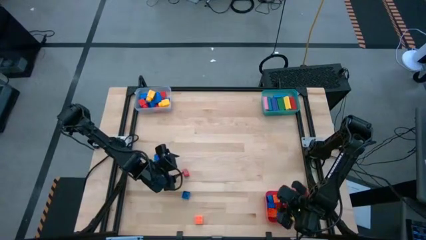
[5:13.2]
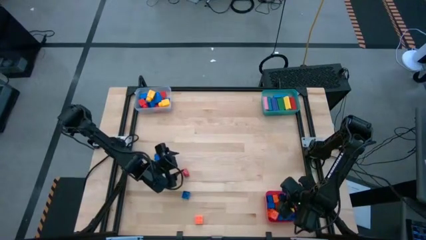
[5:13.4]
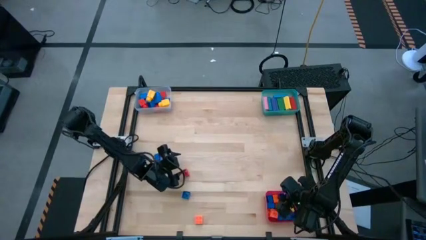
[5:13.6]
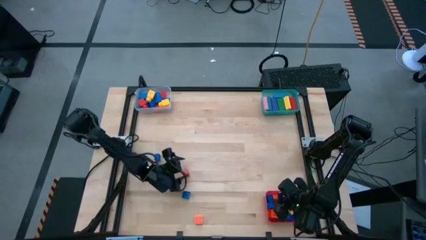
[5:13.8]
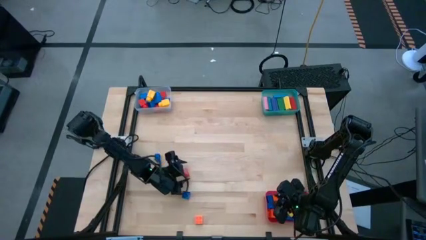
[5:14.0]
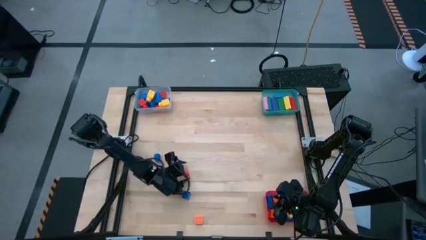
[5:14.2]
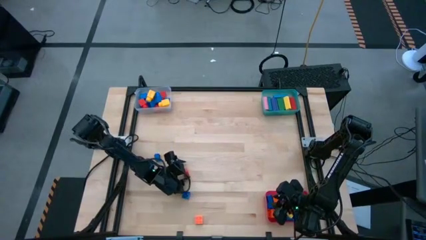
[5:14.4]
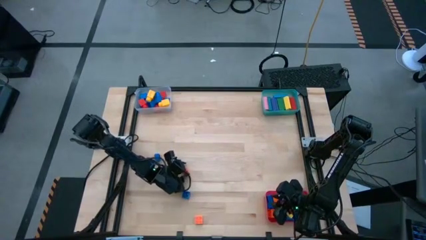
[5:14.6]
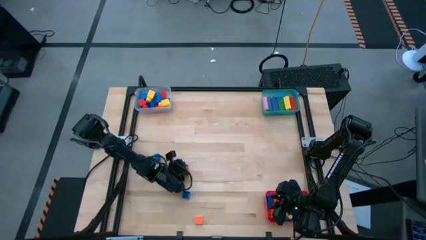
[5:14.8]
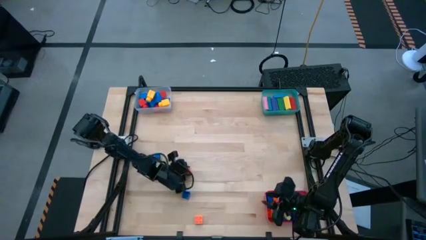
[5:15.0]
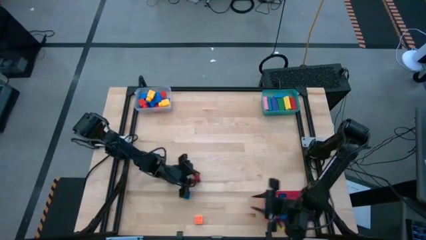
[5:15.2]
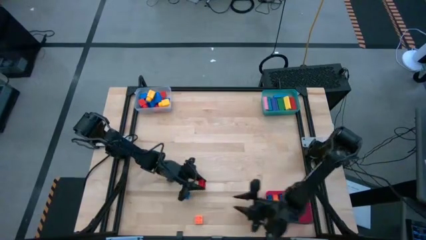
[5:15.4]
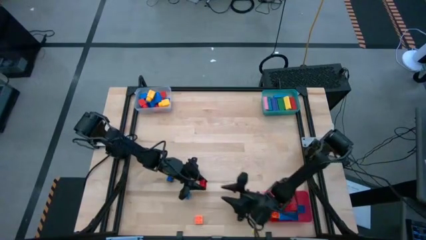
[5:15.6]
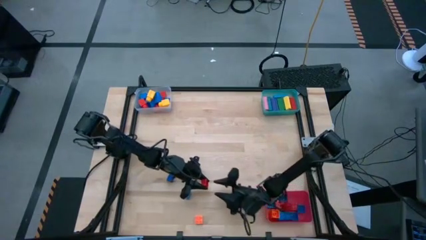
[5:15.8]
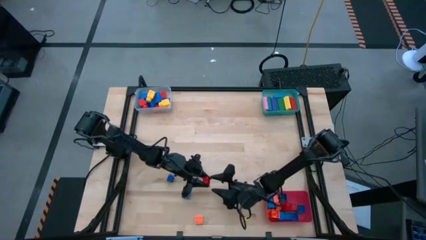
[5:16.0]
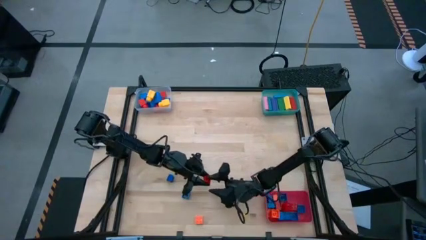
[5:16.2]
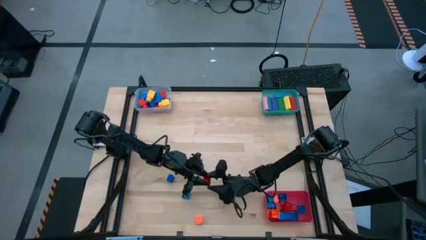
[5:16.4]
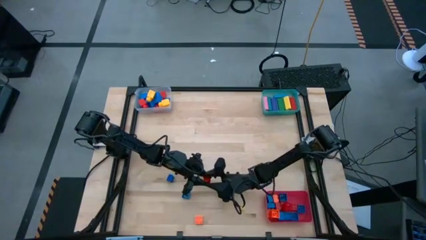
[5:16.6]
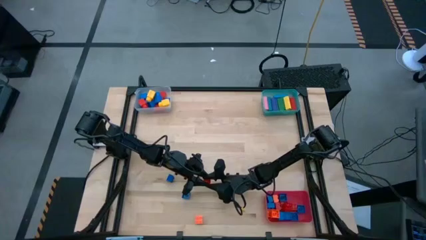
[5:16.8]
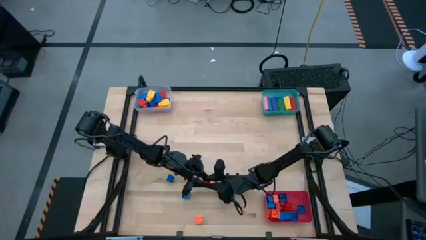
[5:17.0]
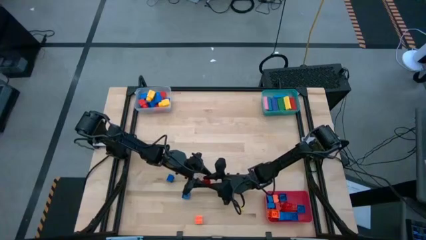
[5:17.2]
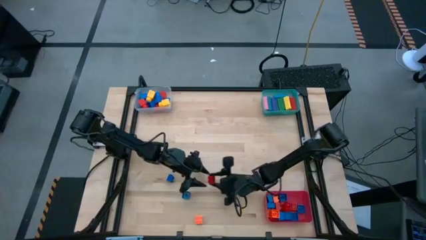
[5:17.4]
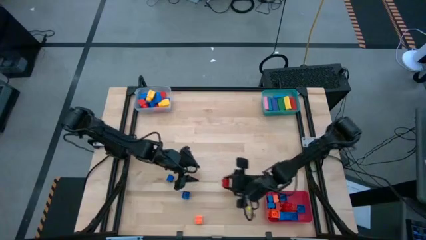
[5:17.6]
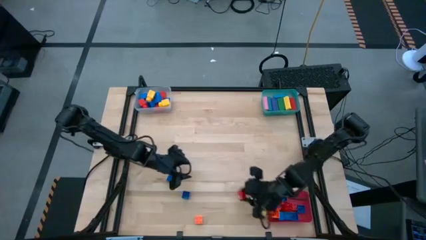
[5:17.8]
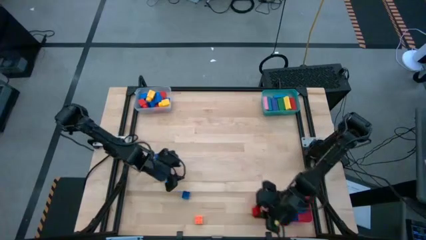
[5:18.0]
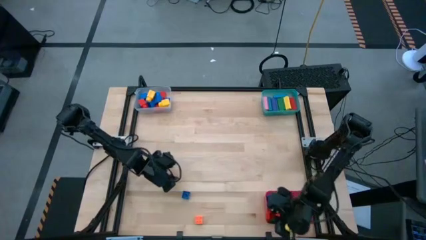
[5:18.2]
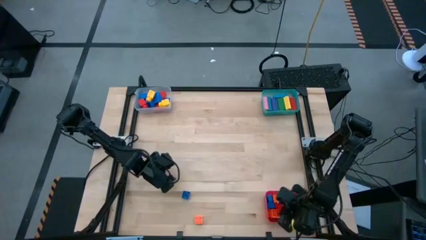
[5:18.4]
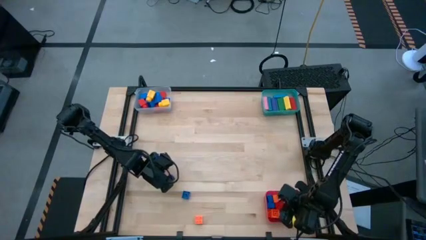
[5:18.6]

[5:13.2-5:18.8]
Task: Sort blocks by size
Put the small red game piece into the red bin

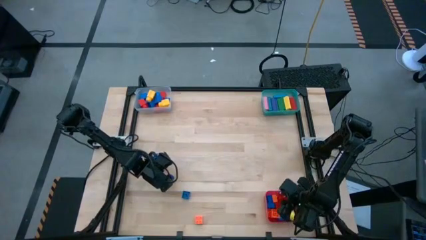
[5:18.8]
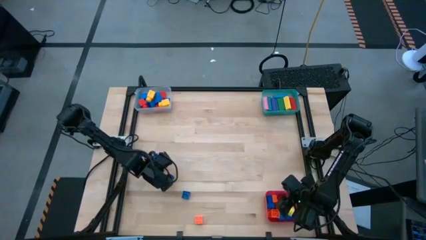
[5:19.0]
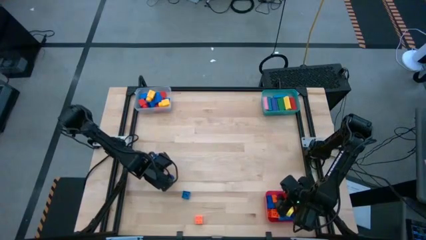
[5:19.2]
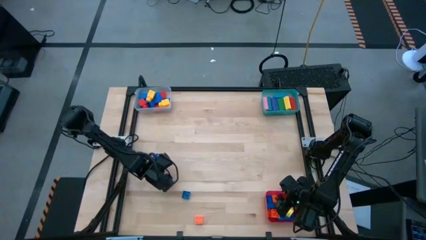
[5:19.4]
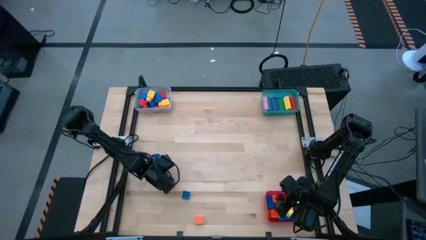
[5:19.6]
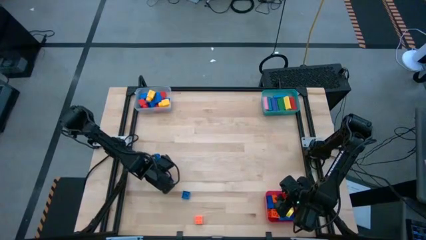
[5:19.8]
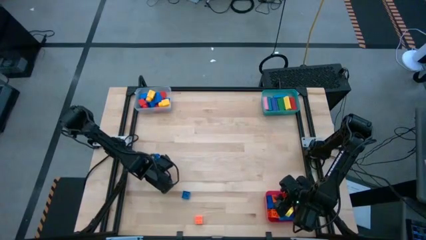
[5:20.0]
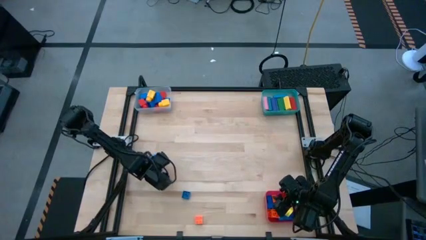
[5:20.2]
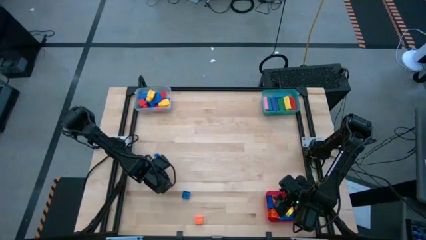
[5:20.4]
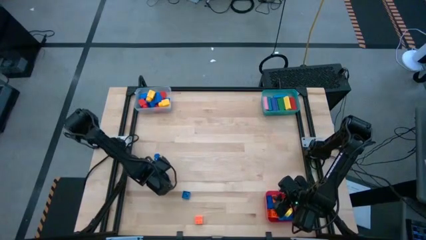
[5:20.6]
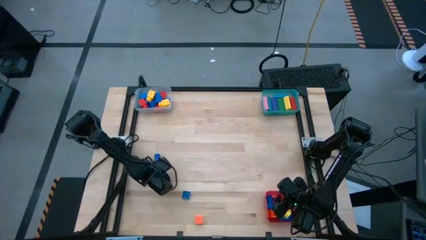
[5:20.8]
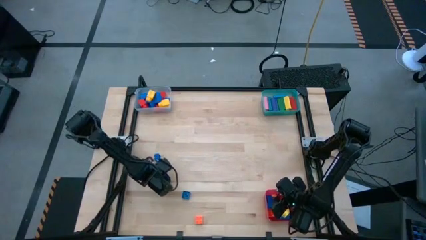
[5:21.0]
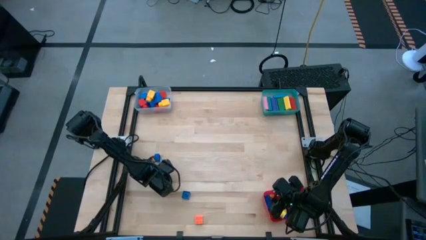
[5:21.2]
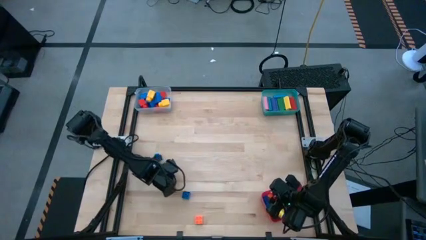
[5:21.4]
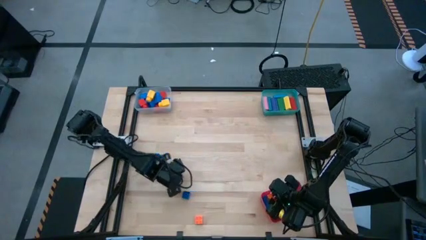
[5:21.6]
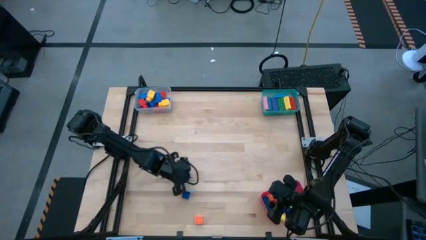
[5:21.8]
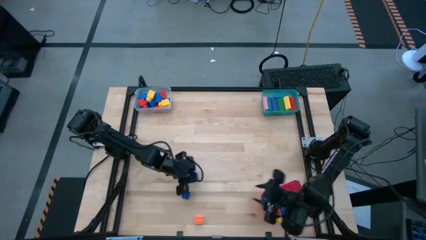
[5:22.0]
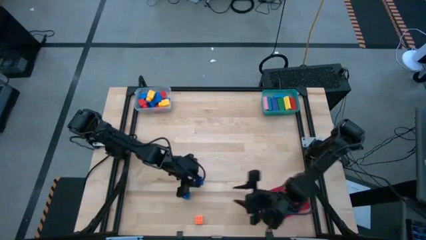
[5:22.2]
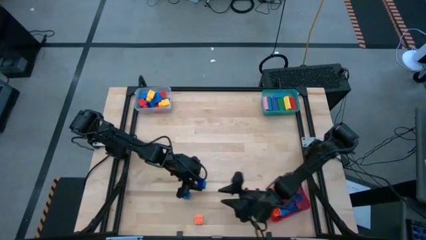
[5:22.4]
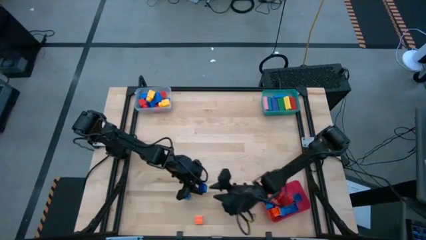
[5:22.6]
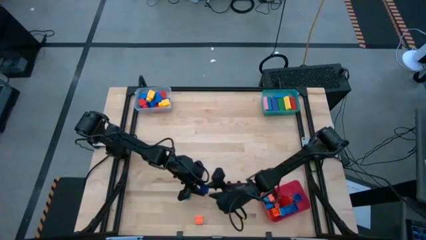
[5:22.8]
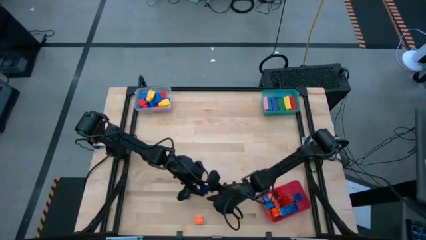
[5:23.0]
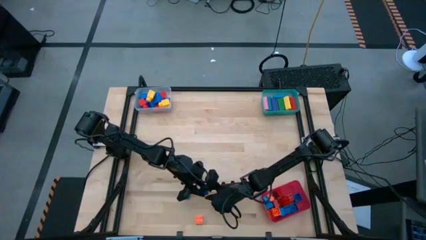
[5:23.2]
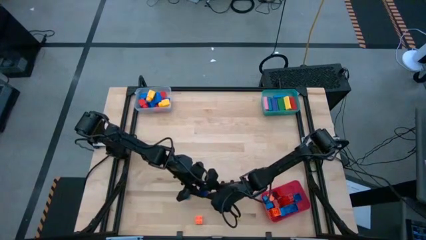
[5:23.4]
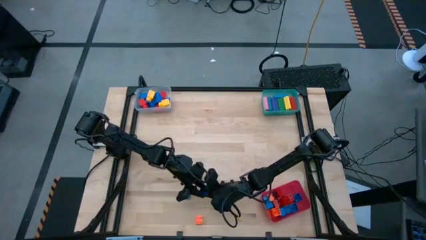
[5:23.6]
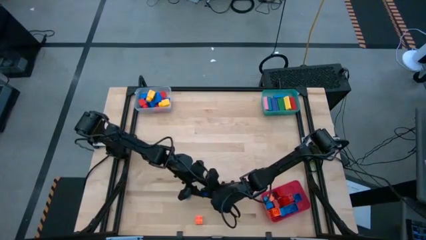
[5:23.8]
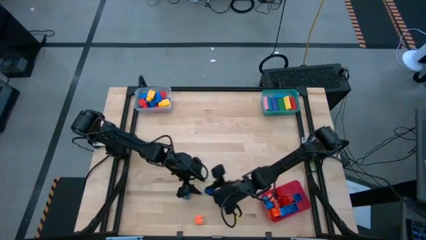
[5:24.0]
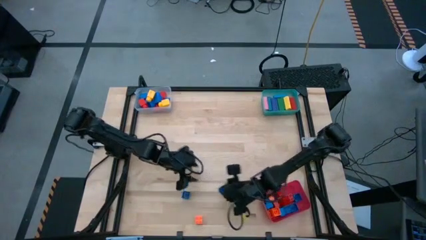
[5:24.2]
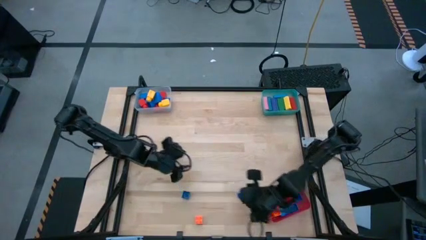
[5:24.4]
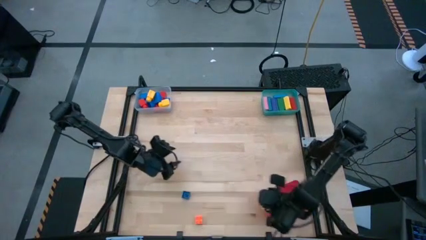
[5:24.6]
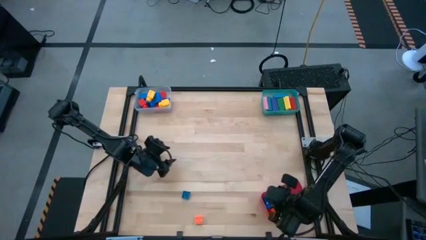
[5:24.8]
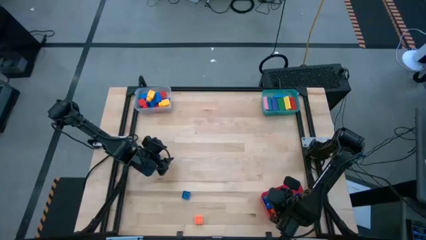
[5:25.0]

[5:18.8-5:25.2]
Put the small blue game piece into the red bin

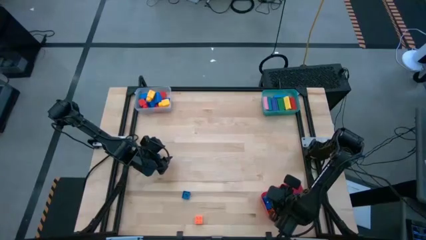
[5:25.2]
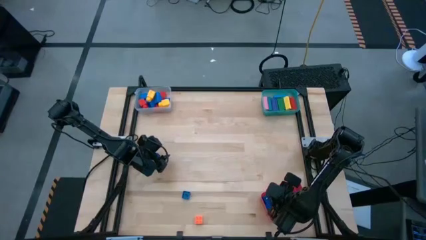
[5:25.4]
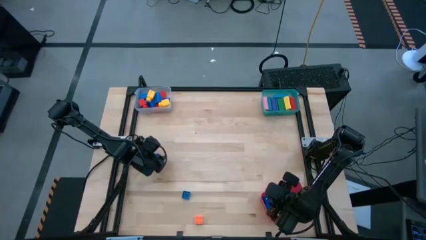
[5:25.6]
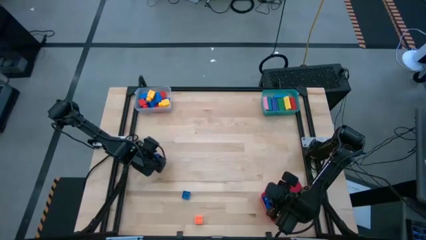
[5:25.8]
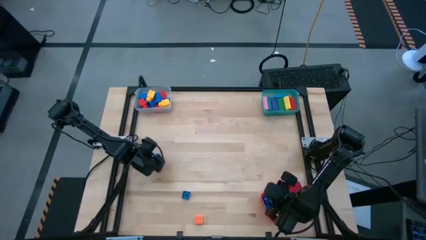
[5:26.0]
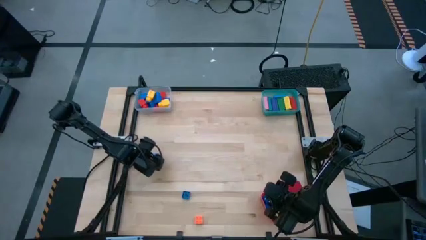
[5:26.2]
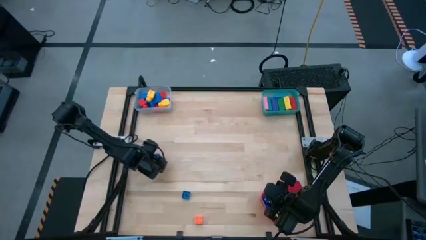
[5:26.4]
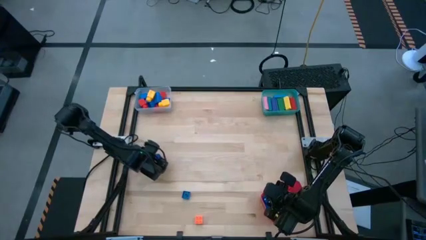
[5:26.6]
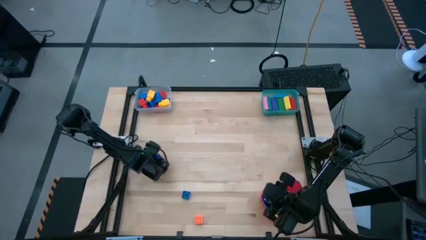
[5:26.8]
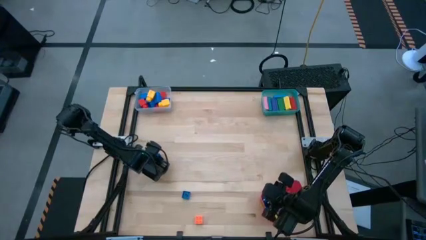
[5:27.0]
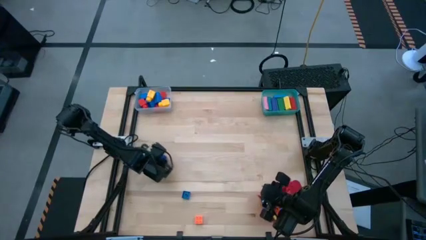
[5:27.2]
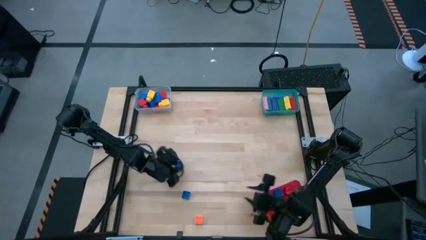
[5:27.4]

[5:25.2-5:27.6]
Put the small blue game piece into the red bin

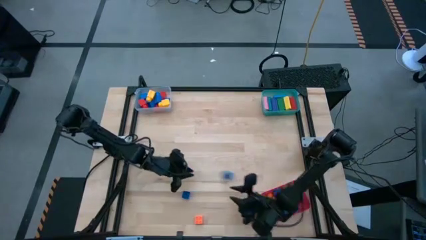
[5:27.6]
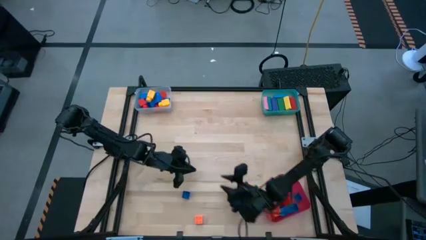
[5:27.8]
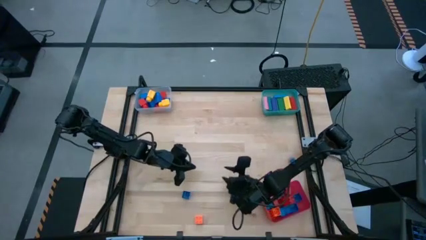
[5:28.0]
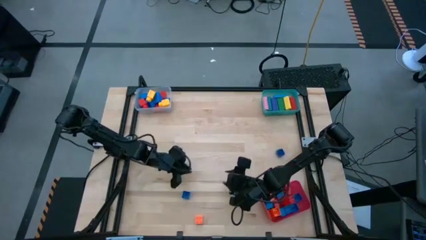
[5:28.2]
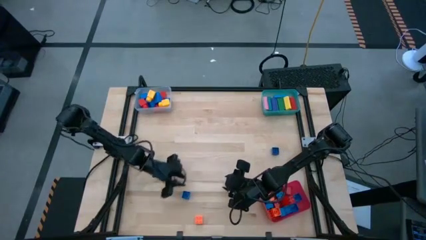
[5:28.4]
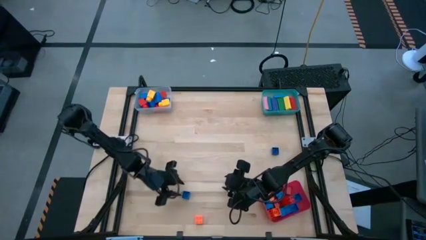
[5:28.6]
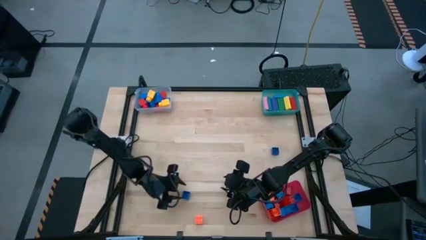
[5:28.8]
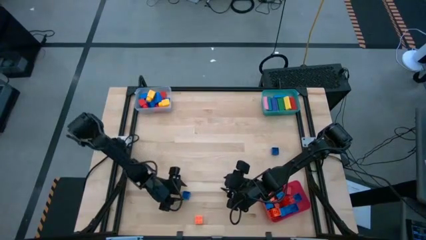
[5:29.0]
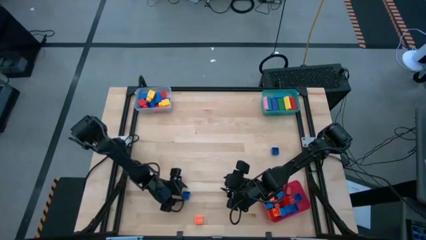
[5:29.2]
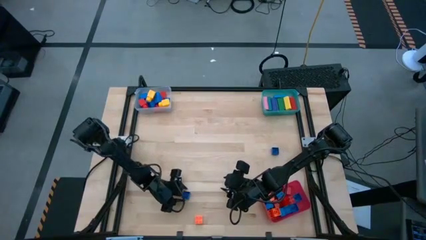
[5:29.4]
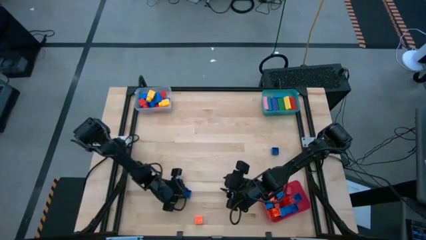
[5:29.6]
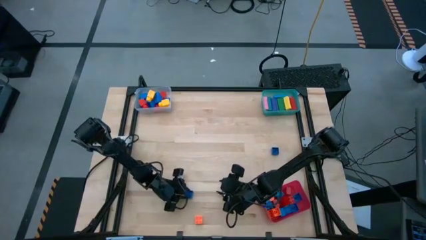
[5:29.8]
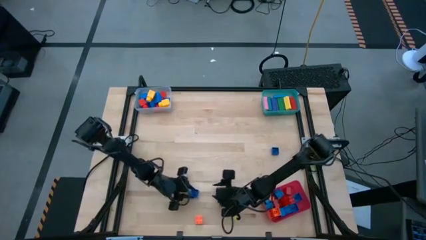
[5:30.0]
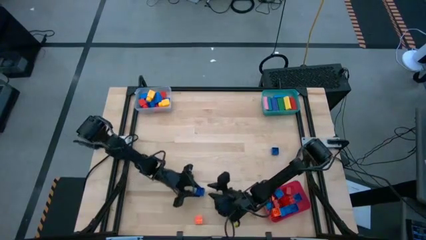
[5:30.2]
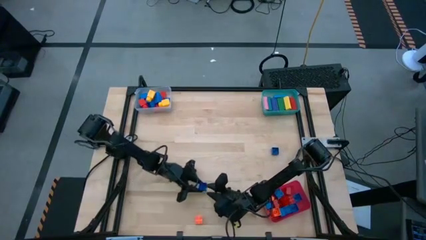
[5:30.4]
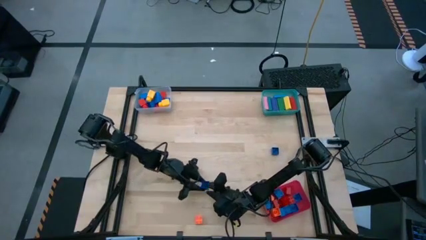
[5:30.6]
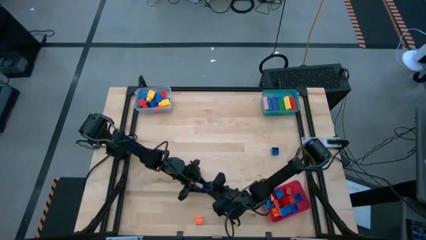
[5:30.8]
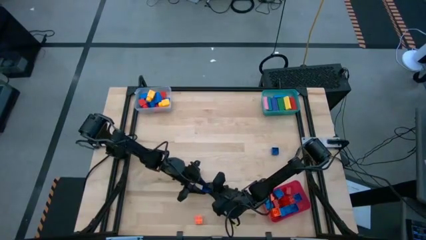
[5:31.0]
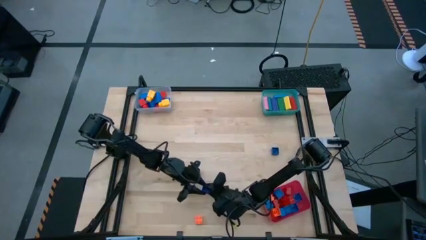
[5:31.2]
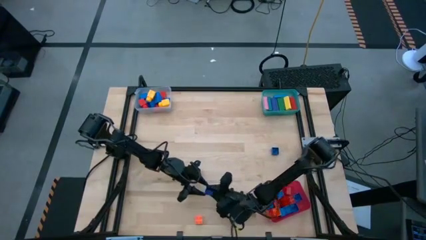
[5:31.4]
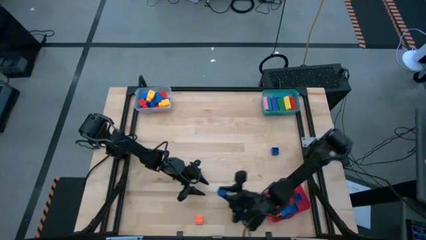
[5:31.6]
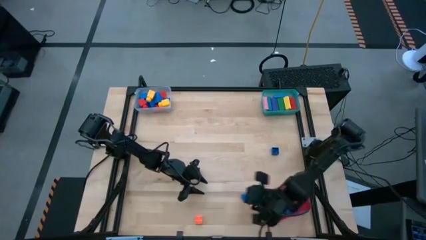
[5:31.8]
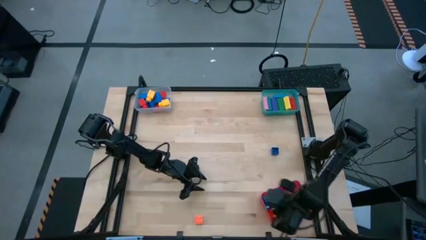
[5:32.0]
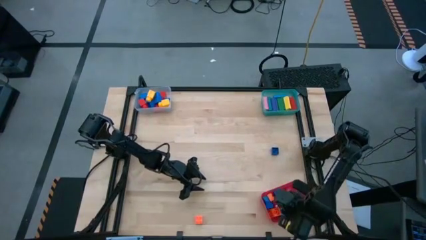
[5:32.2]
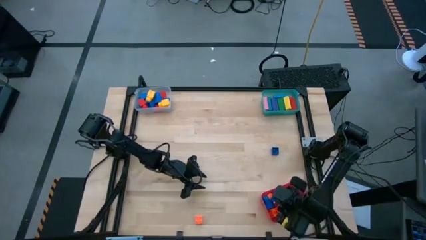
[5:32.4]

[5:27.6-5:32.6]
Put the small blue game piece into the red bin
